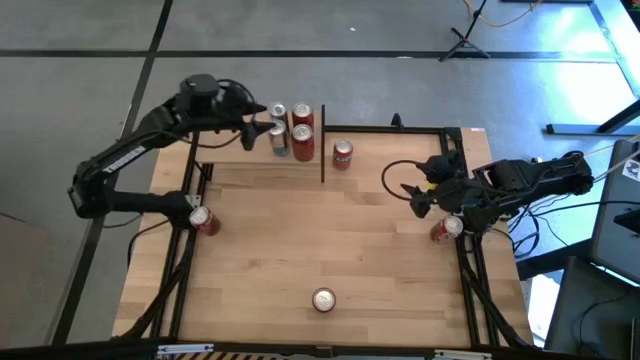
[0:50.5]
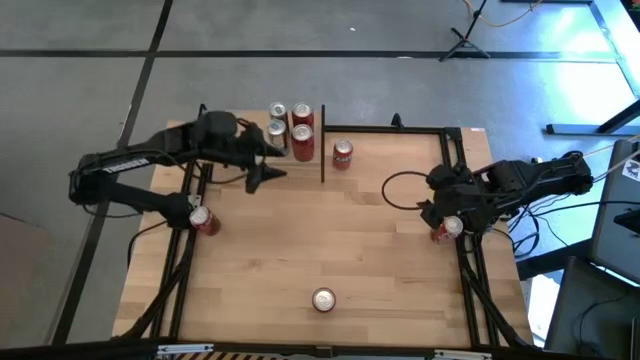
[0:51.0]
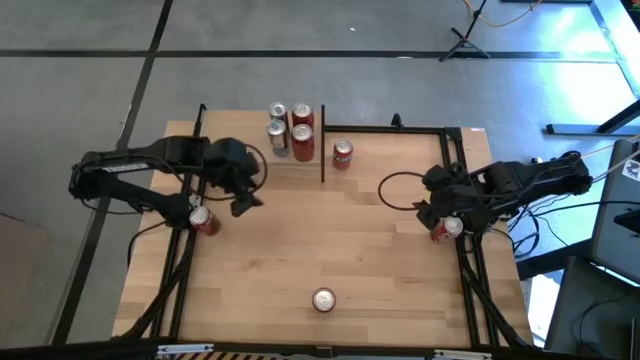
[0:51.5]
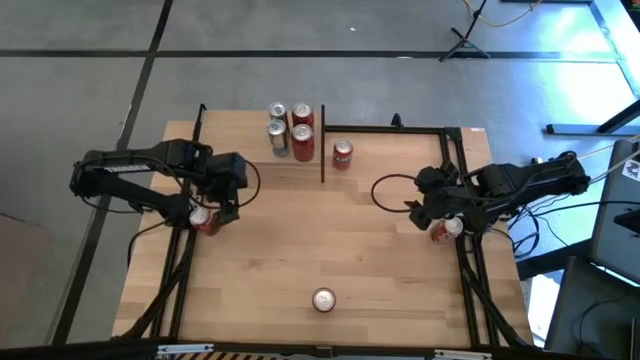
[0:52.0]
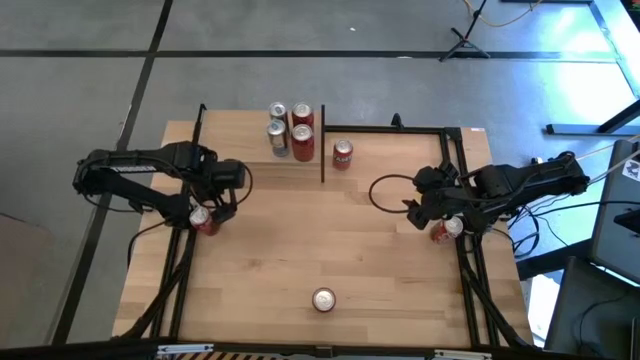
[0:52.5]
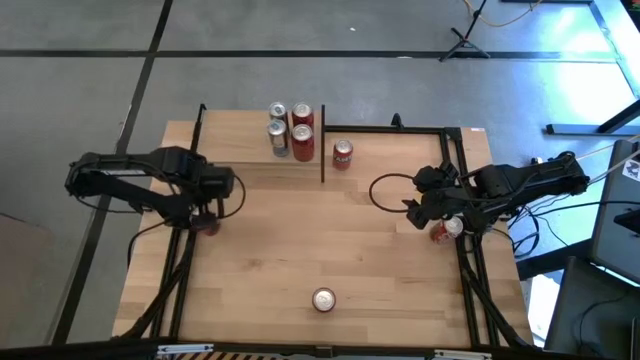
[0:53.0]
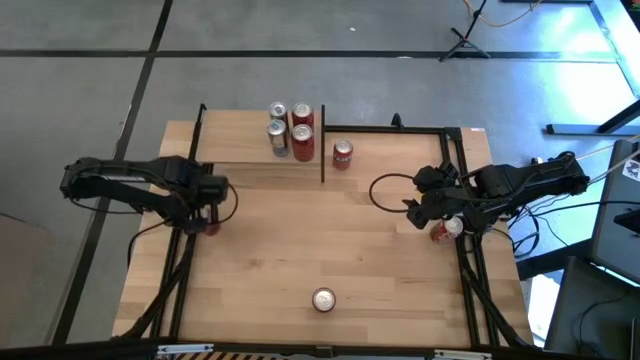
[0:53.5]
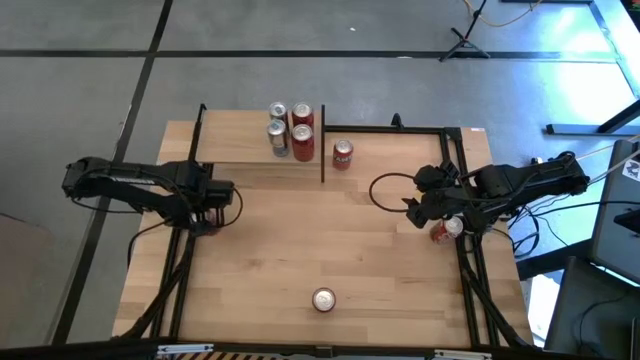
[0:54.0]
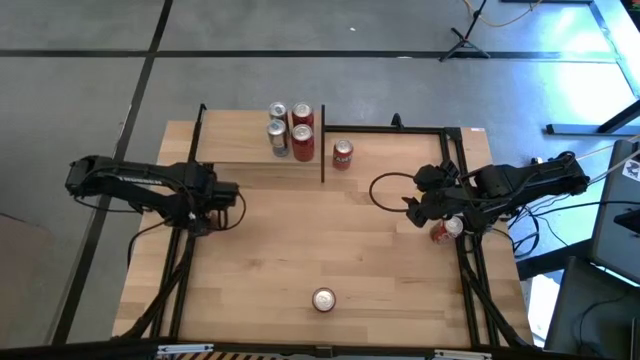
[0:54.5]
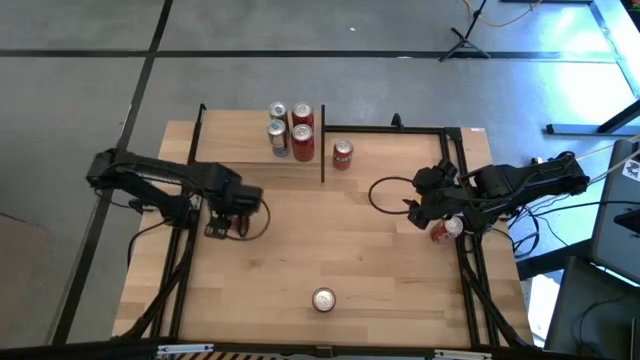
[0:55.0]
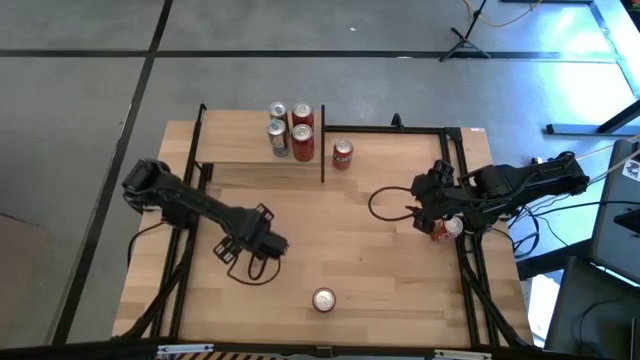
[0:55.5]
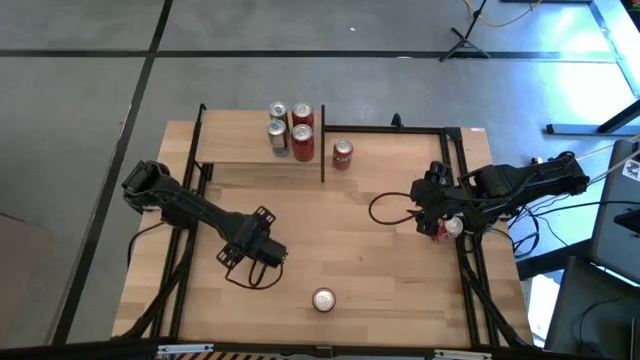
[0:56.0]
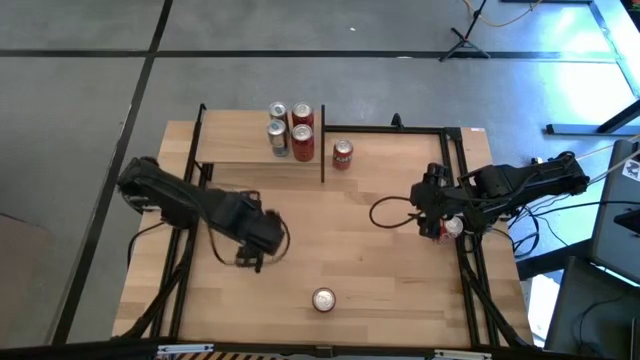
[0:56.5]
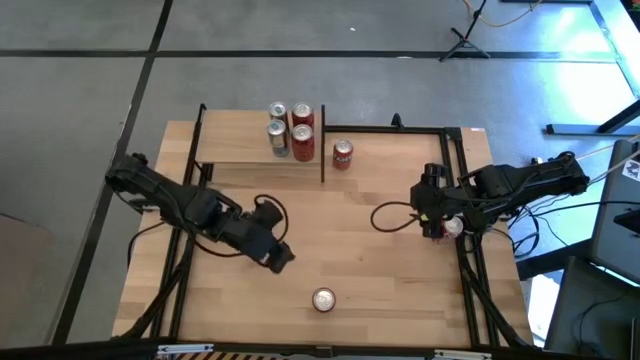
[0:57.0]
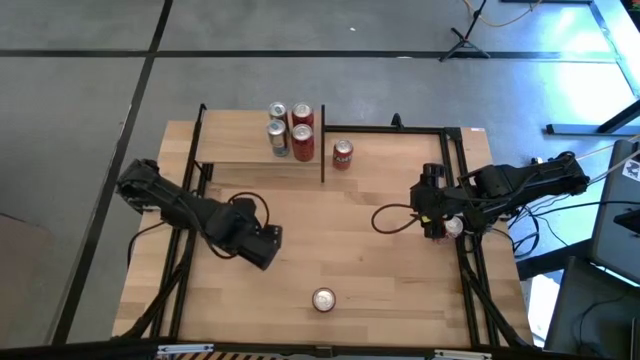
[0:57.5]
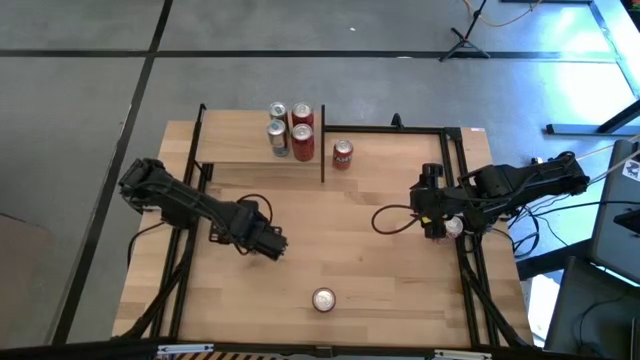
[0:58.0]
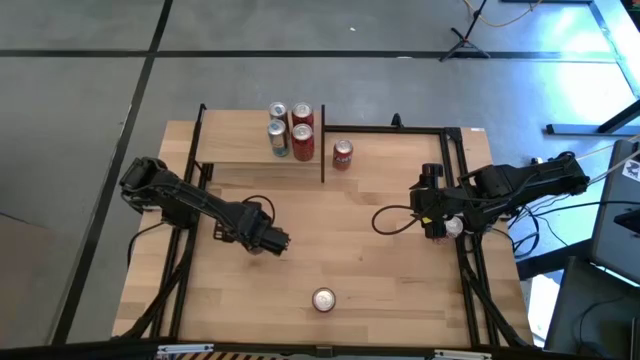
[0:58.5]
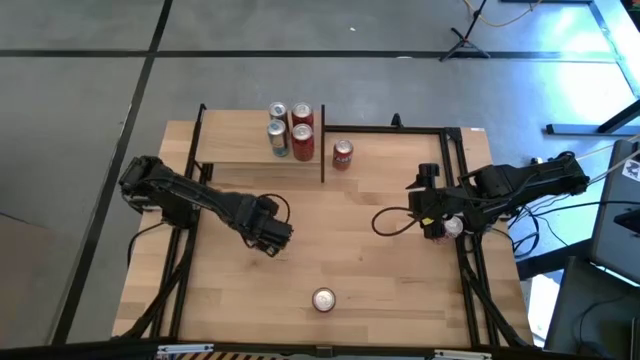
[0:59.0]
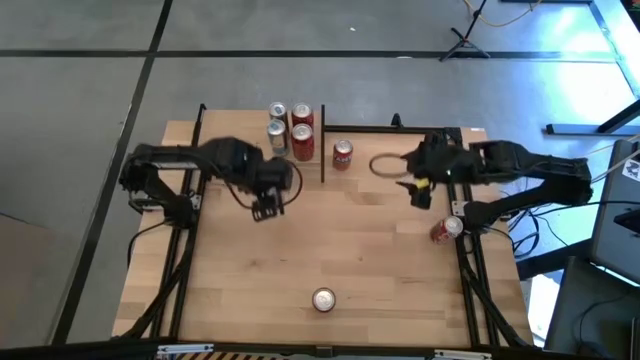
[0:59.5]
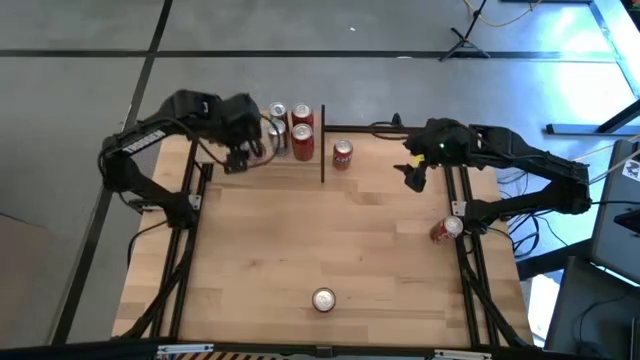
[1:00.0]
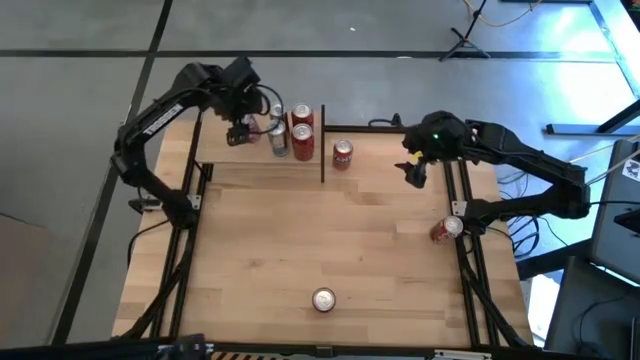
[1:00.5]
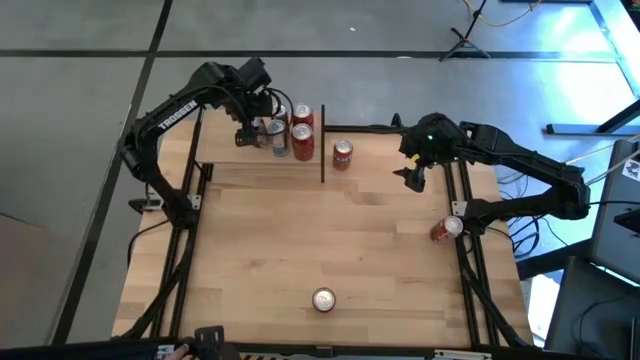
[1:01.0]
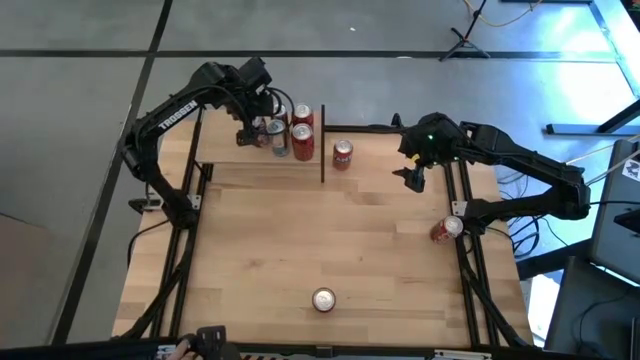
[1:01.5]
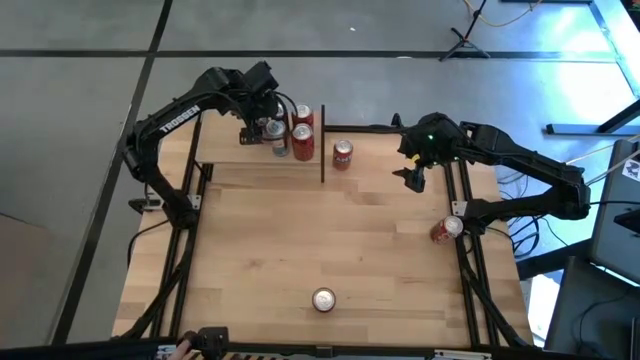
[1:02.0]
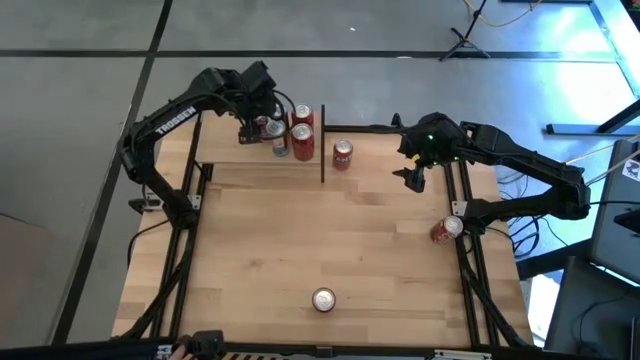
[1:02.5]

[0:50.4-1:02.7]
Task: Place canned beverage on shelf
Put the left red white soda can on the shelf

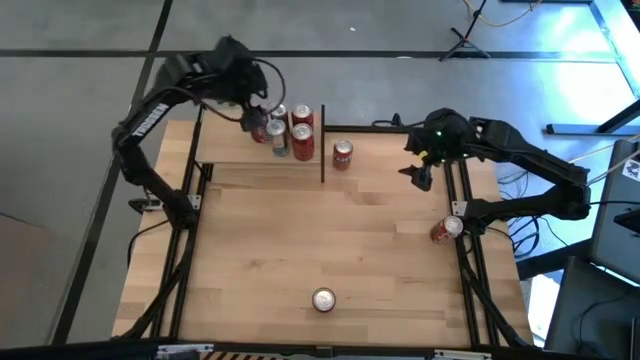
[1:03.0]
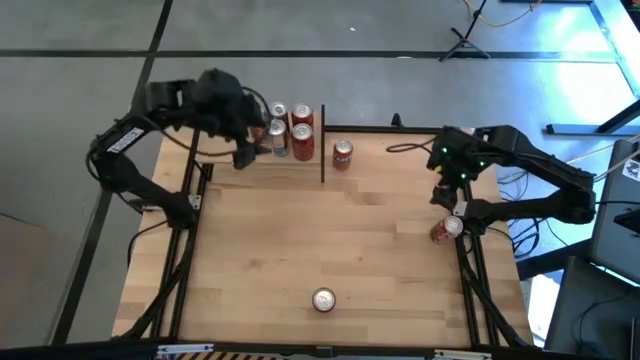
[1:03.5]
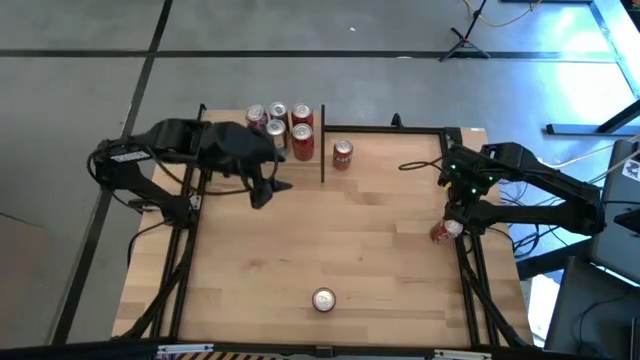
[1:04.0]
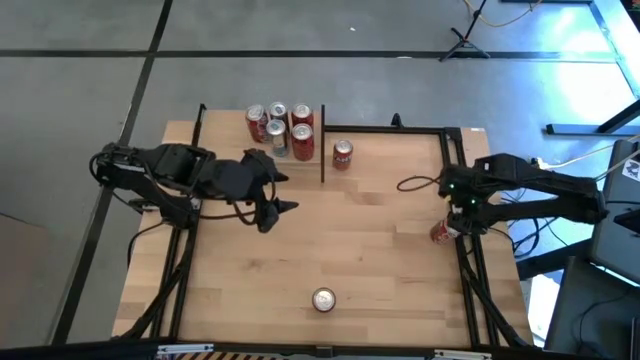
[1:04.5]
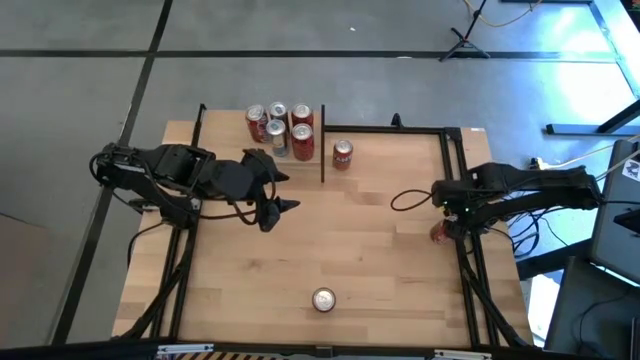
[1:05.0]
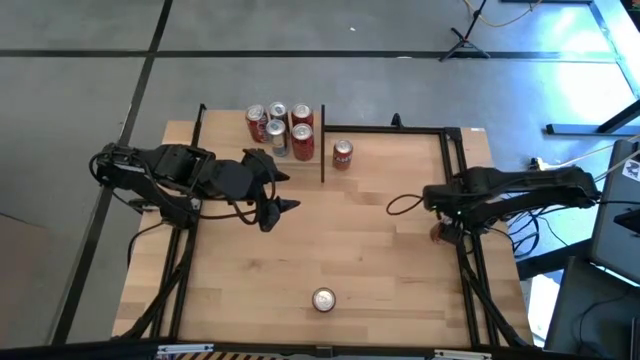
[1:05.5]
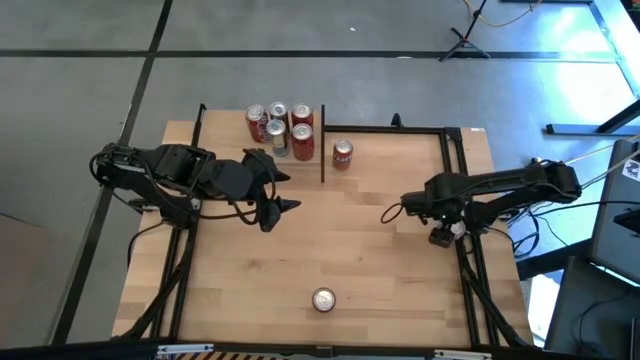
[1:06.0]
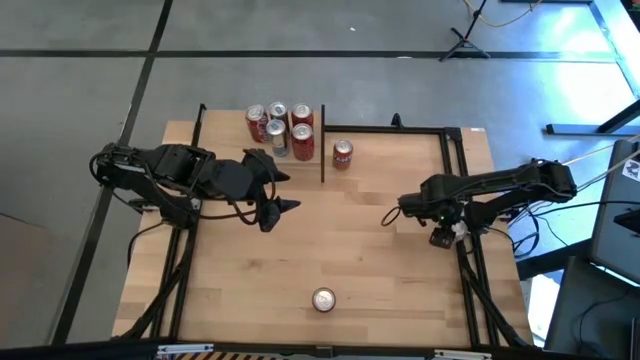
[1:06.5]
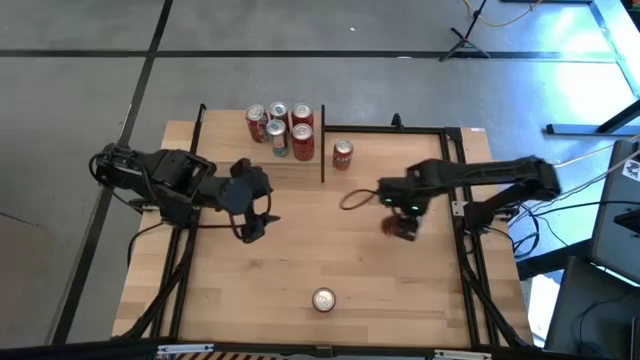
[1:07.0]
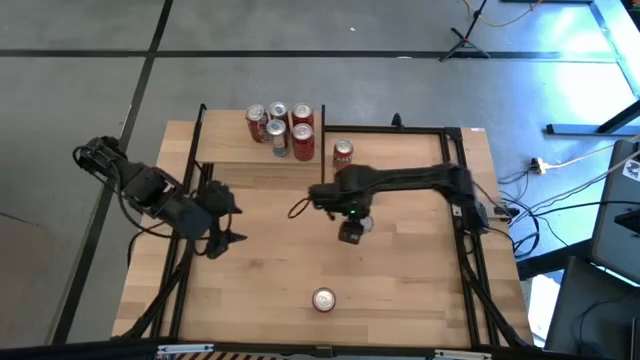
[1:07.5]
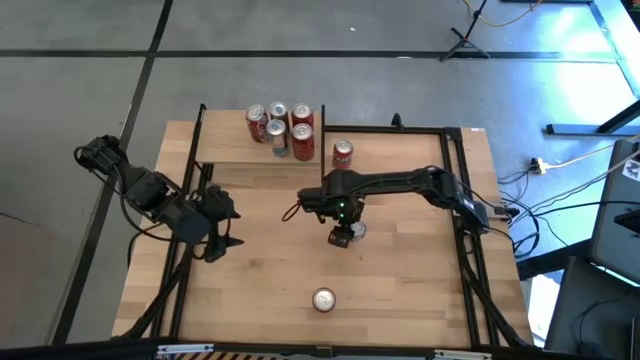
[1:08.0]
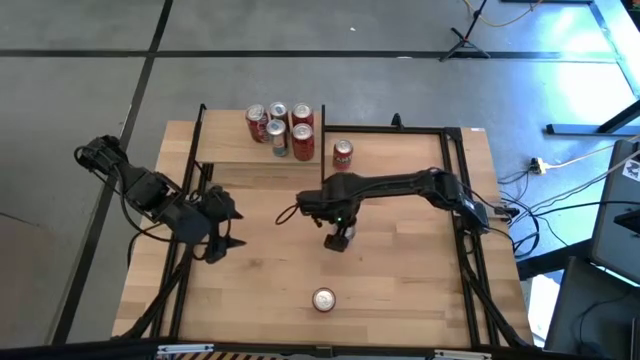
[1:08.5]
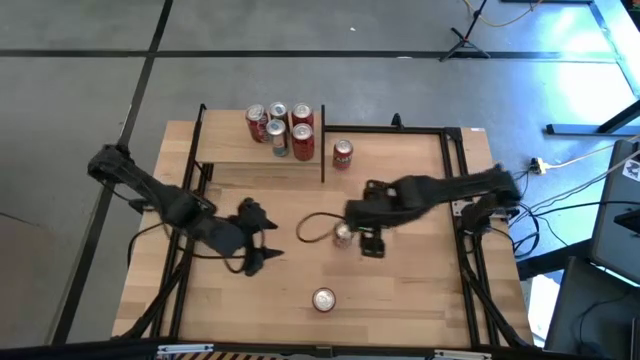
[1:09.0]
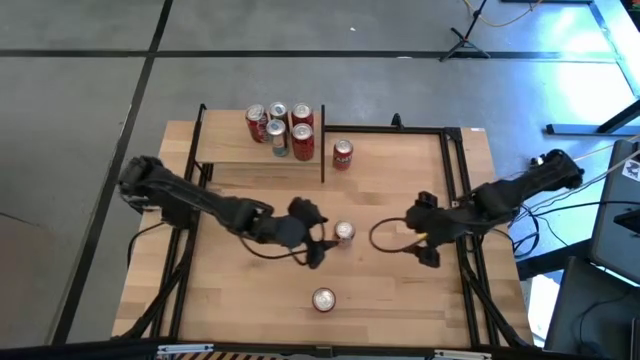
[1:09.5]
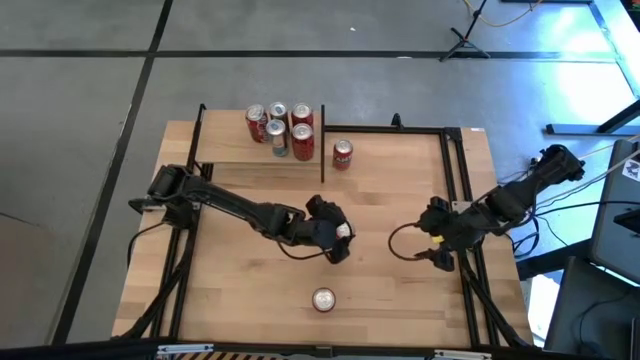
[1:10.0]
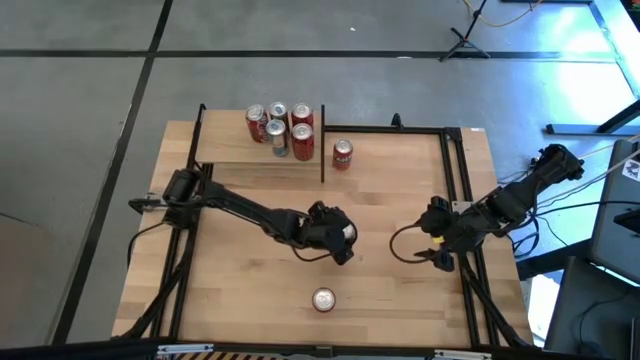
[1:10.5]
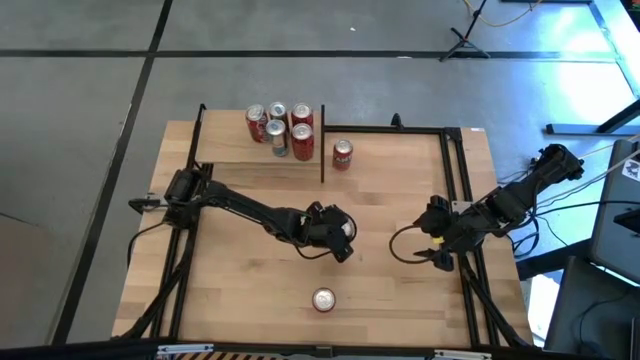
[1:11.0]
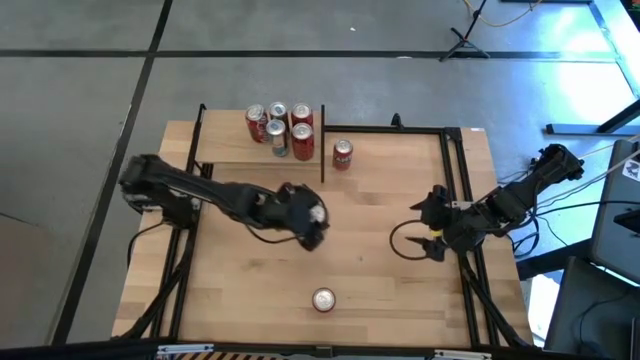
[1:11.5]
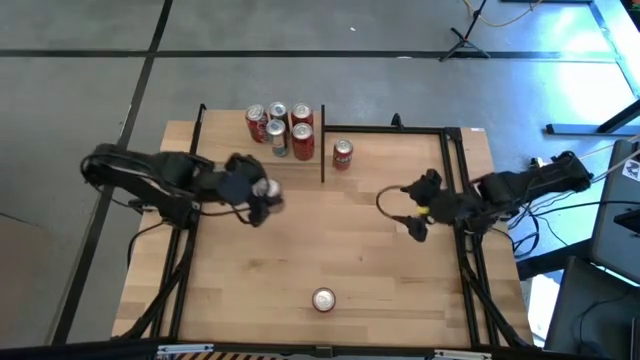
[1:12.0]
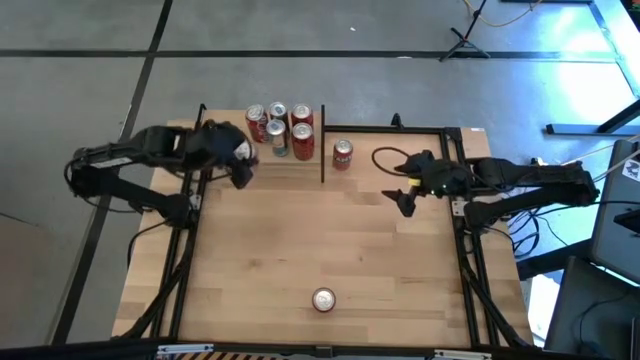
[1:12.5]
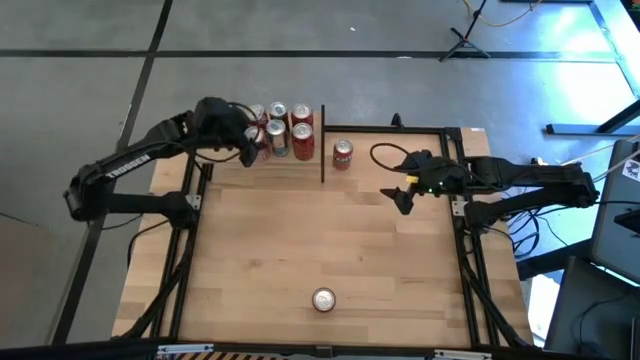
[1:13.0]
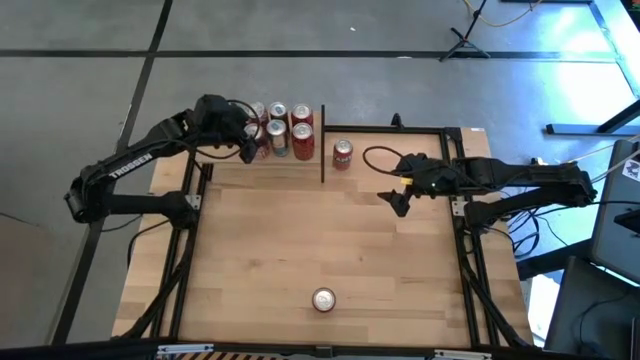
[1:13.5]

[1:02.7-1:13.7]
Put the red white soda can on the shelf aligned with the other red white soda can
